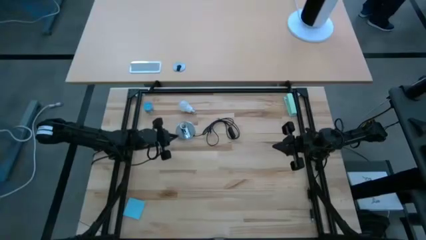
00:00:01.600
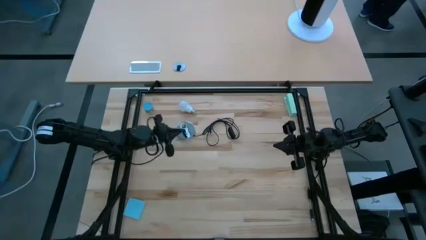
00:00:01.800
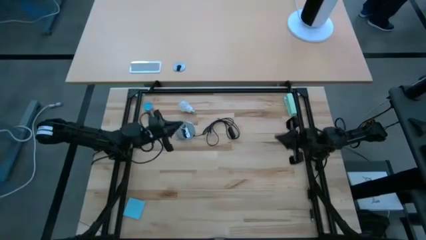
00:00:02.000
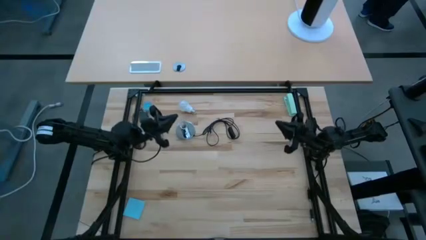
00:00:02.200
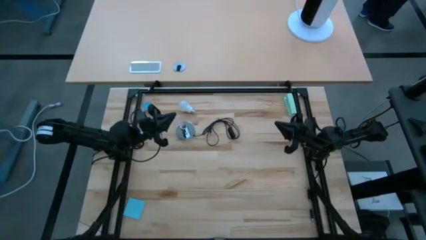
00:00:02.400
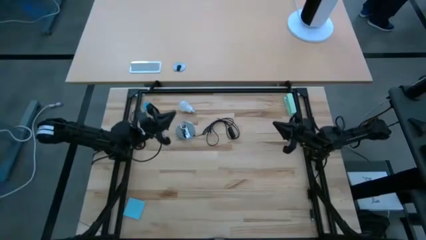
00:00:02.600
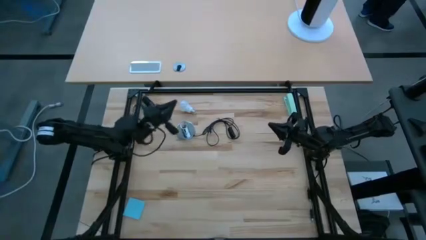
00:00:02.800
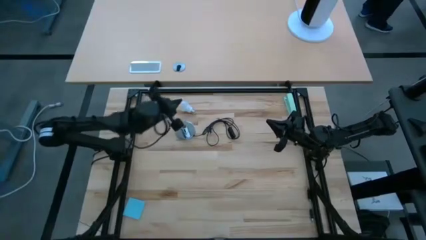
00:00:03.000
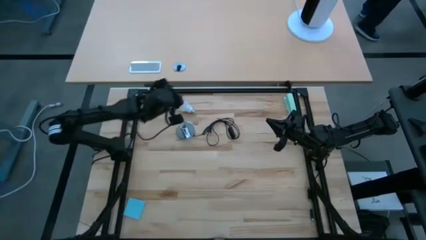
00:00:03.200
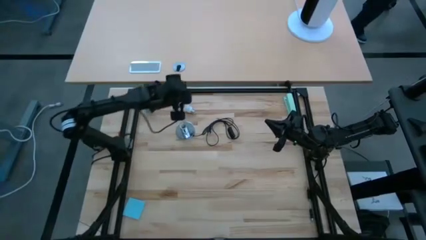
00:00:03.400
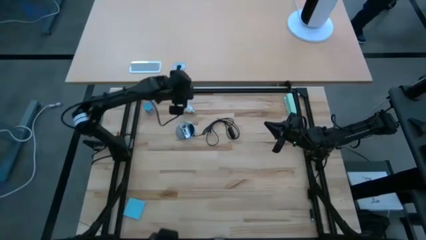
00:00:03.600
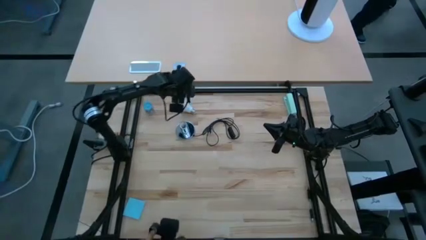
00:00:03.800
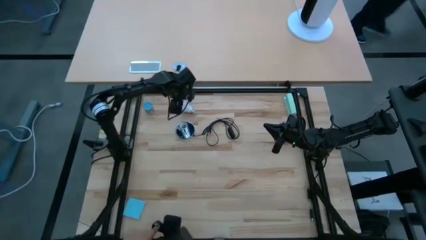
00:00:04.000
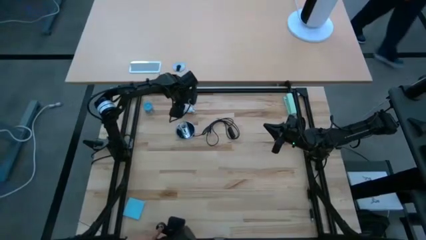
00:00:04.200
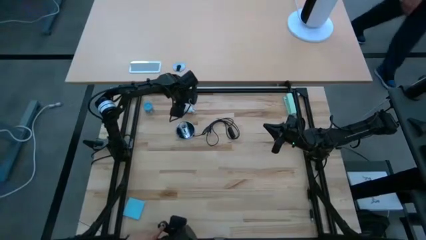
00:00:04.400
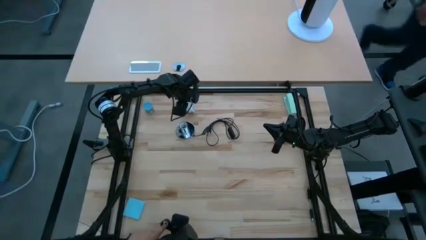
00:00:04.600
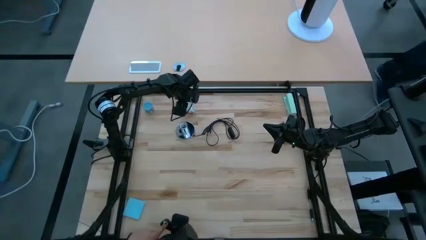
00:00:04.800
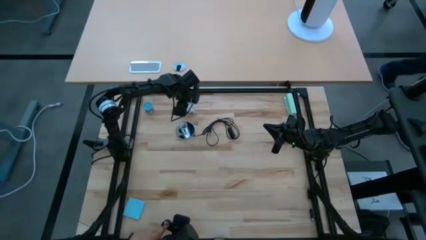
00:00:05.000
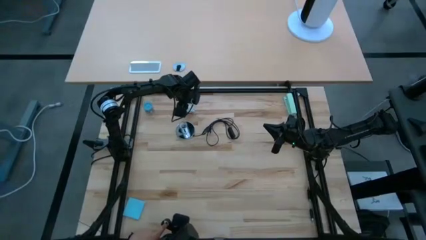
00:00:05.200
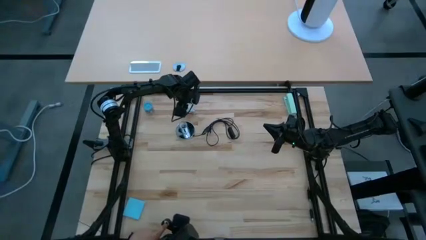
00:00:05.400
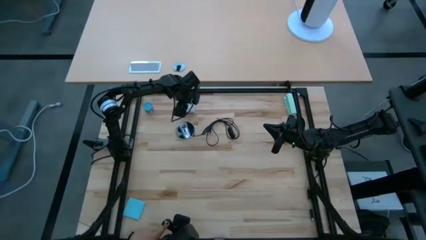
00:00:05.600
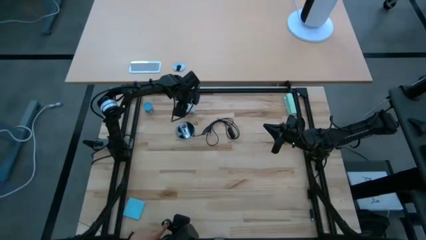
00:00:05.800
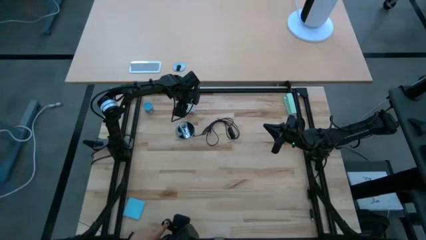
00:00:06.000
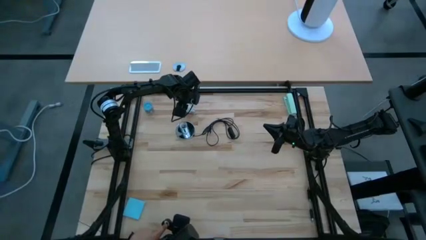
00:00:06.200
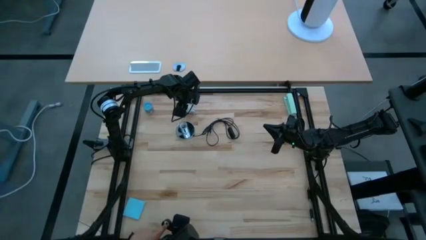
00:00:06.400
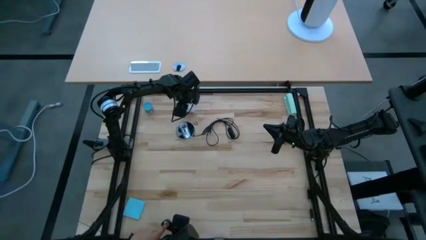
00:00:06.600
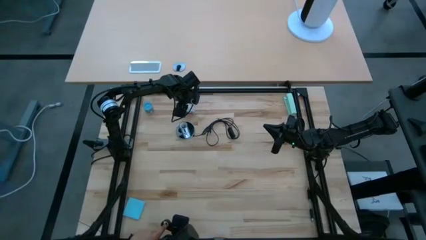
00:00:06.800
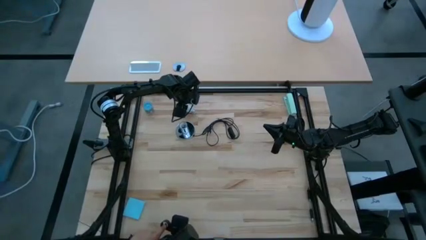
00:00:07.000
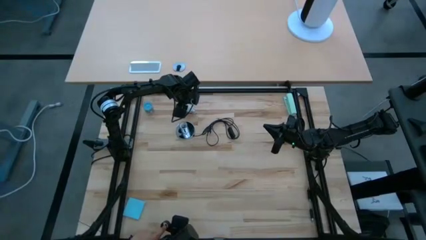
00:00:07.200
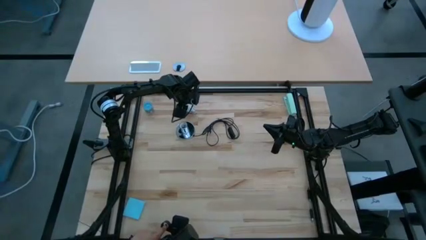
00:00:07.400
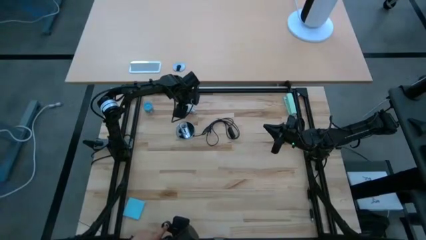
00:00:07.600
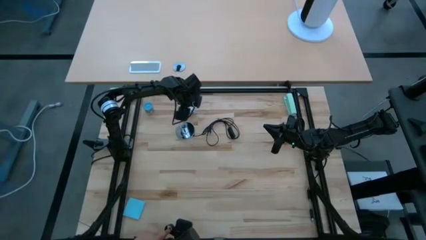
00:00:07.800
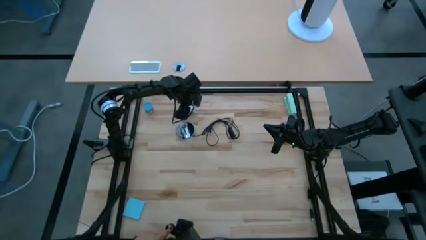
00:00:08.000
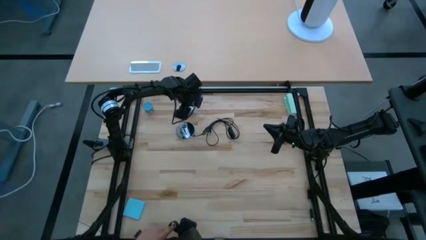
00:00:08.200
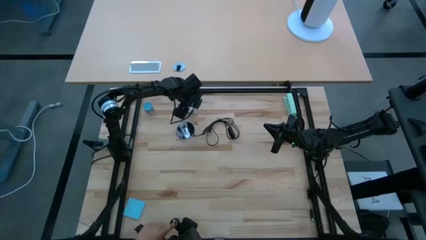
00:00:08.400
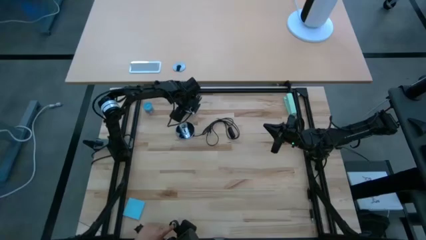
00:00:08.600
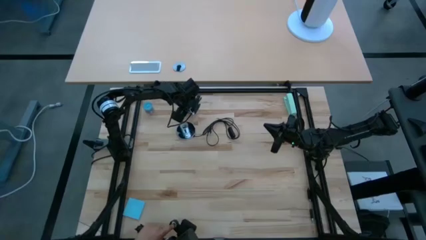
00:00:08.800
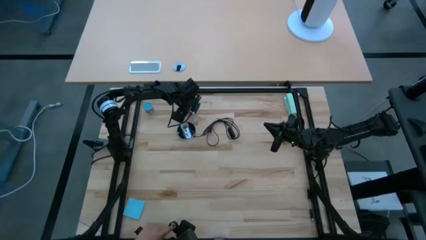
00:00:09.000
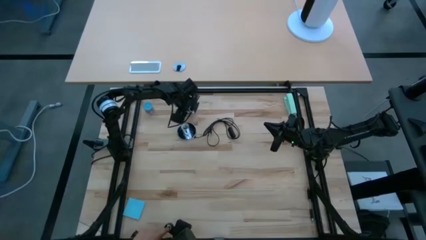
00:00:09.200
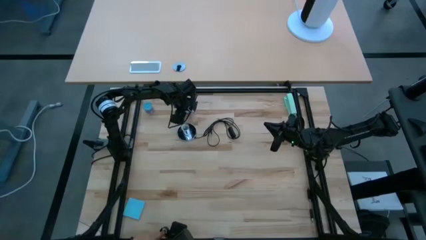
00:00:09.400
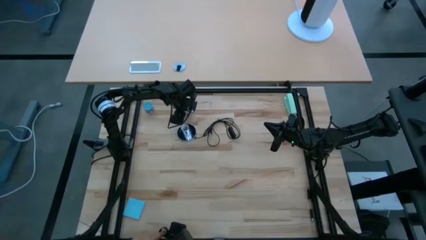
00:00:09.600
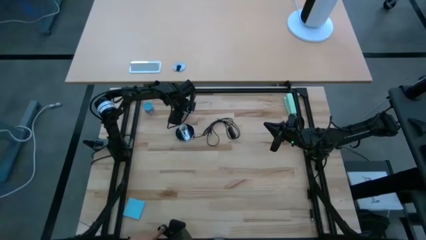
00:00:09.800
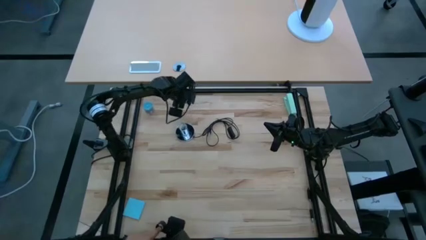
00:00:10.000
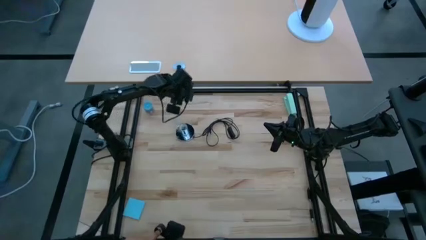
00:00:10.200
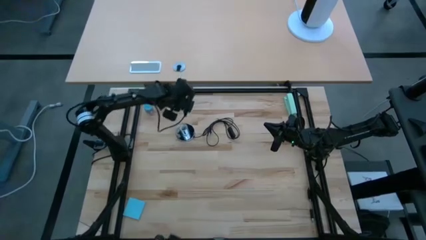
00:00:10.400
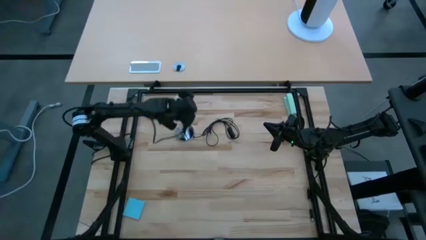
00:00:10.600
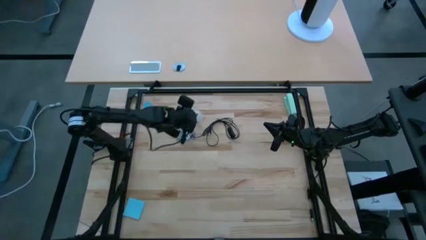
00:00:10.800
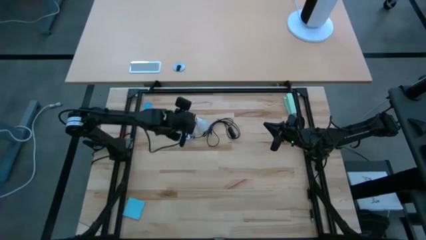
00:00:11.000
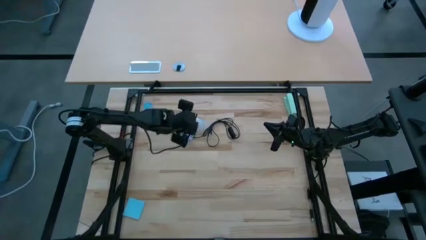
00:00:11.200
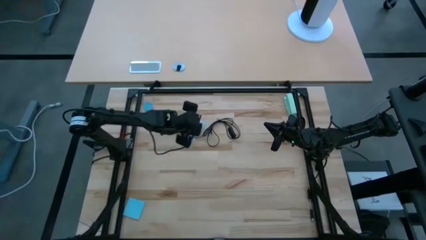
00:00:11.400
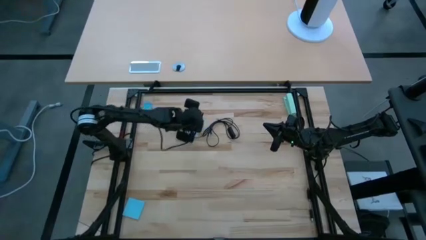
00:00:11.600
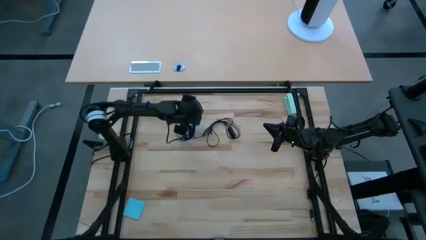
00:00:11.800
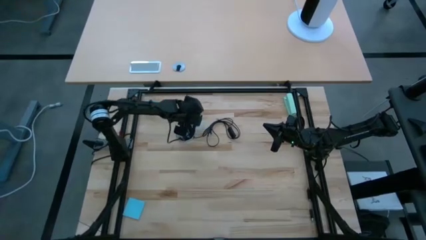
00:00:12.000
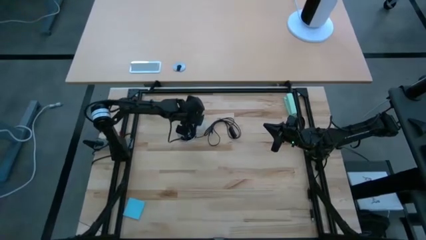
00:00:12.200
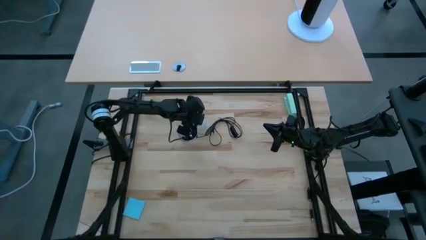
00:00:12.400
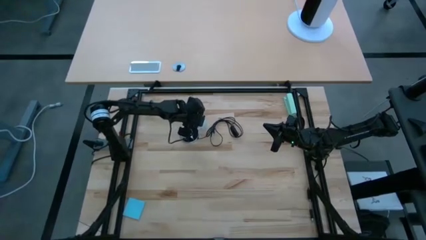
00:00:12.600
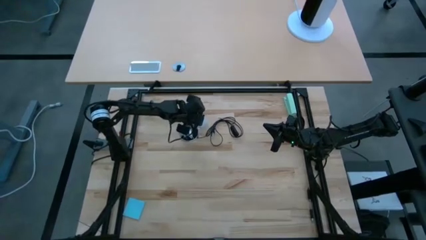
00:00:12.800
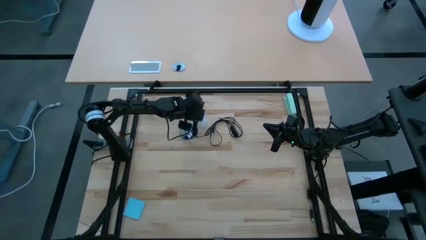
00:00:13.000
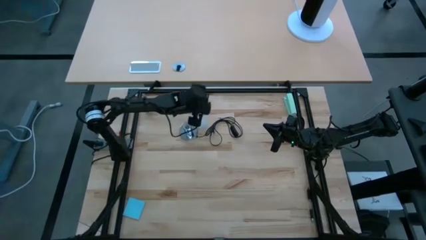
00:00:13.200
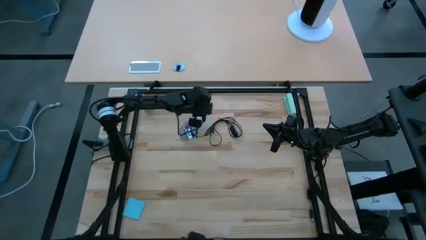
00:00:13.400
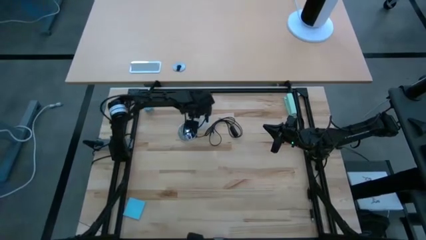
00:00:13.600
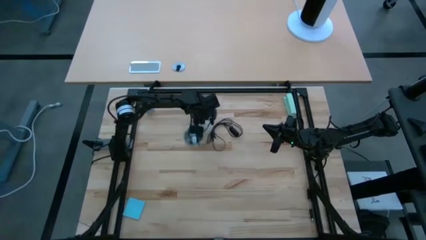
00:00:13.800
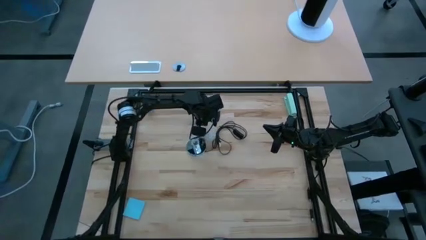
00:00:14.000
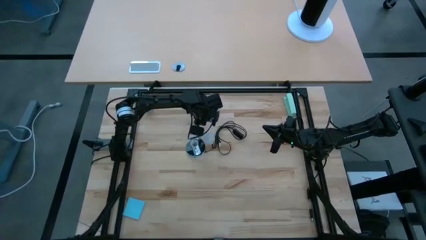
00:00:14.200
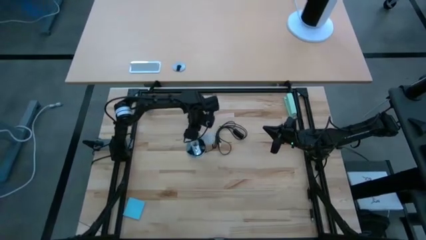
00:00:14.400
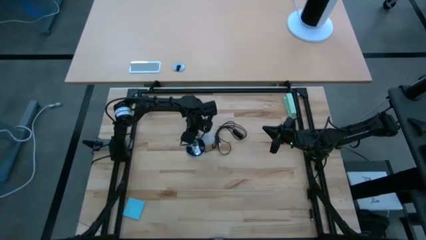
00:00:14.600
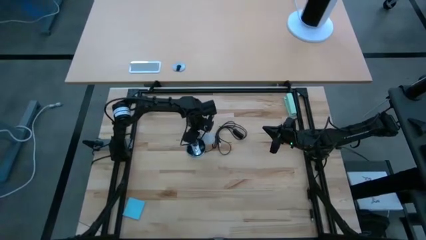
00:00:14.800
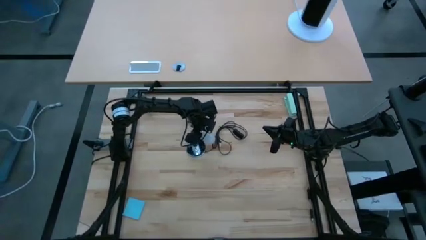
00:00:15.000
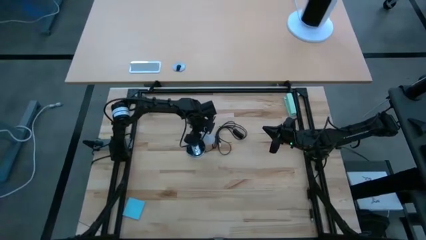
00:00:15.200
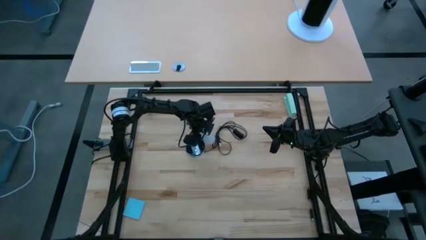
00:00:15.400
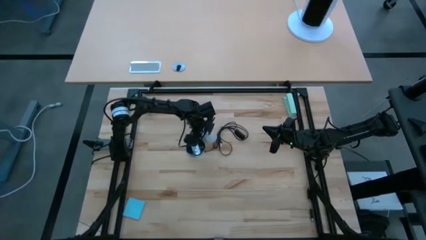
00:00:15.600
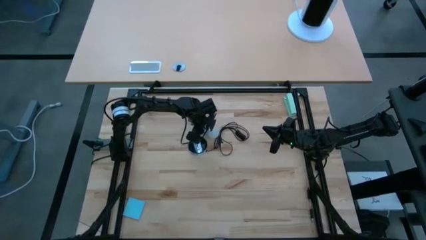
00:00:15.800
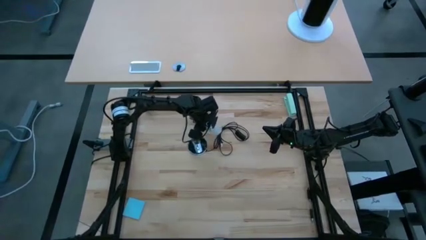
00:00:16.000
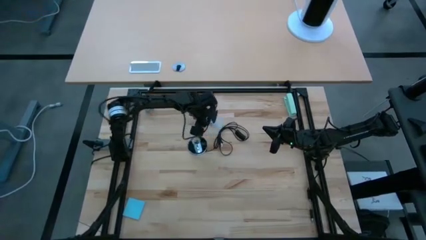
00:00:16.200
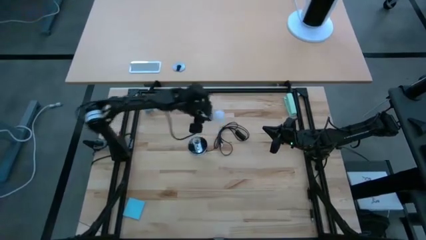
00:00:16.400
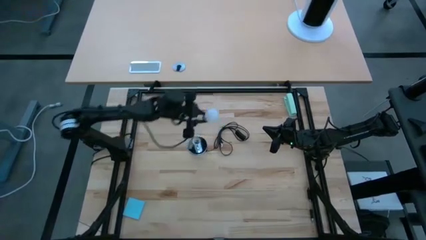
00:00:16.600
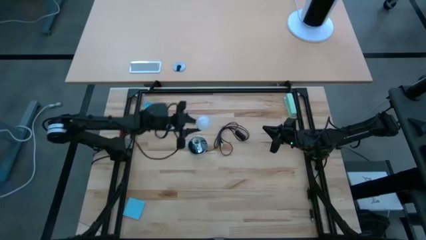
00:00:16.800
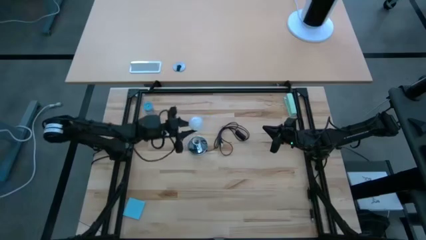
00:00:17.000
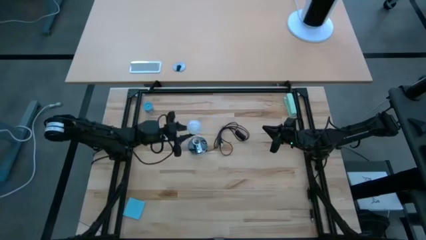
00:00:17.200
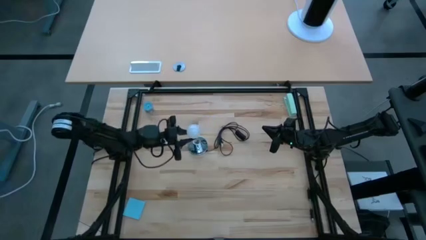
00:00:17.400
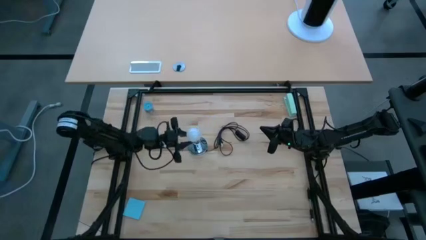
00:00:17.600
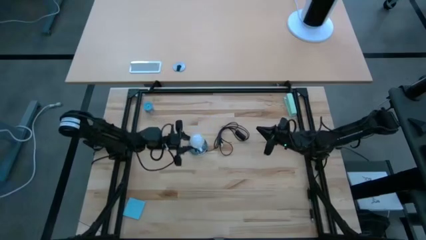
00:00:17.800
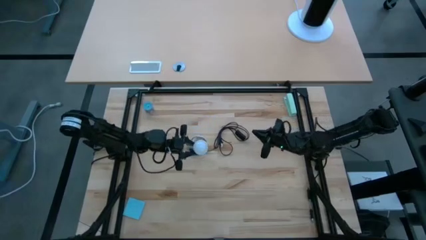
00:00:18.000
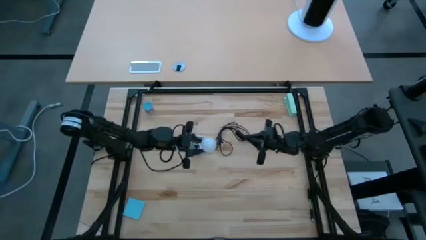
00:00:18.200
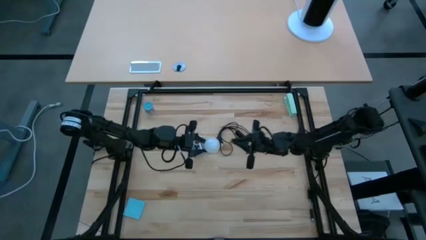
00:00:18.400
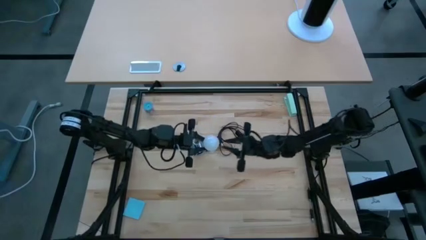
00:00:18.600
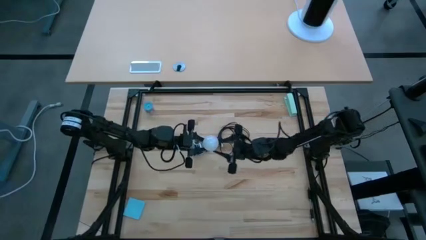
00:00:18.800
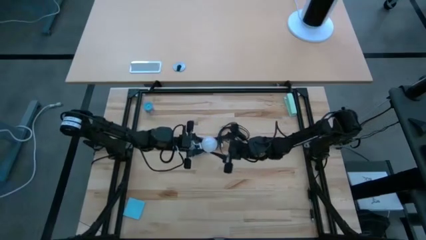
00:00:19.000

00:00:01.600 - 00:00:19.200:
Task: Screw lightbulb
Insert the lightbulb into the lamp
